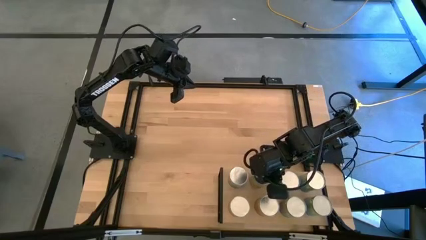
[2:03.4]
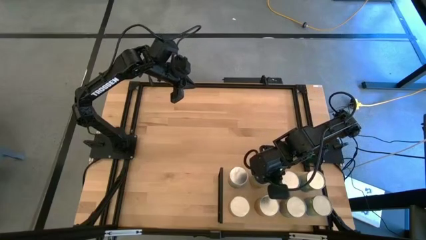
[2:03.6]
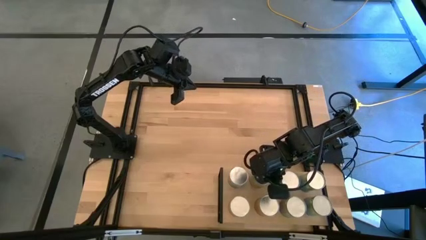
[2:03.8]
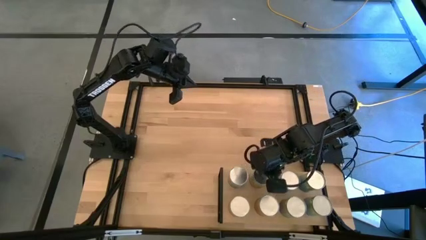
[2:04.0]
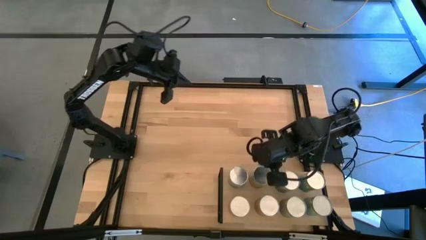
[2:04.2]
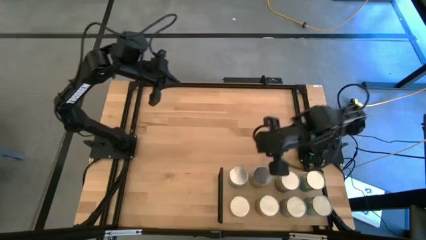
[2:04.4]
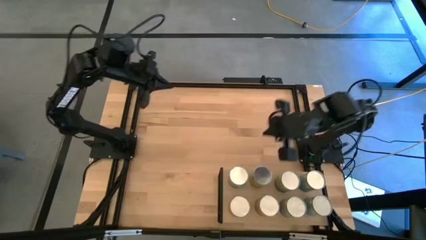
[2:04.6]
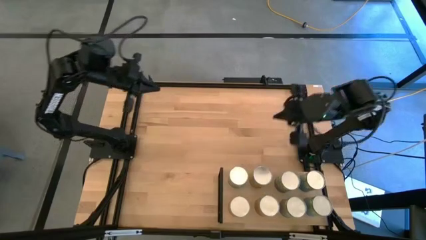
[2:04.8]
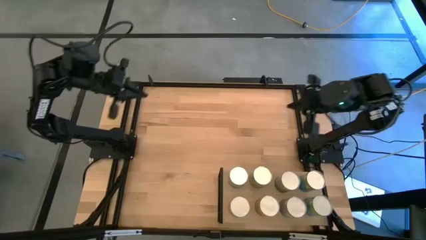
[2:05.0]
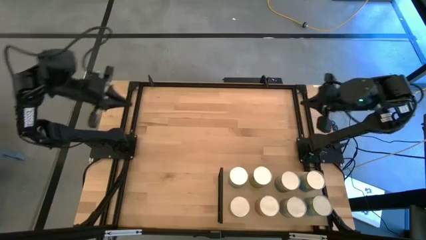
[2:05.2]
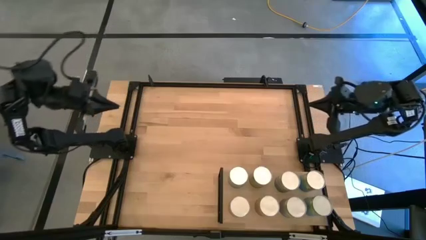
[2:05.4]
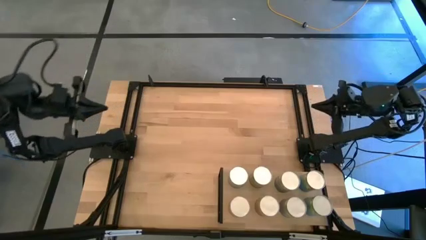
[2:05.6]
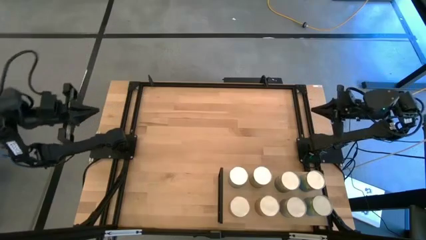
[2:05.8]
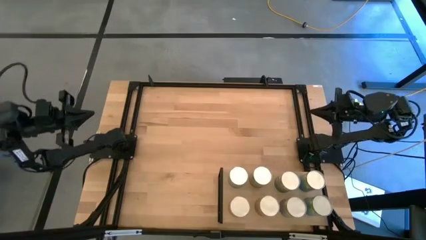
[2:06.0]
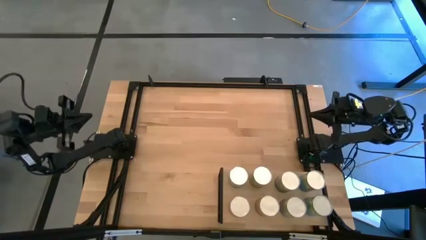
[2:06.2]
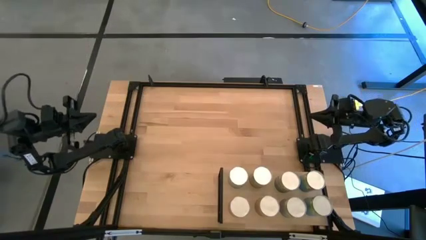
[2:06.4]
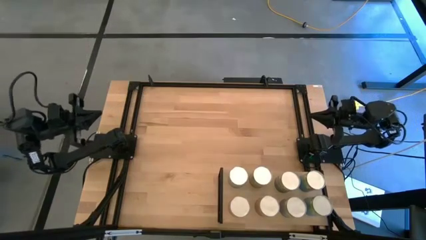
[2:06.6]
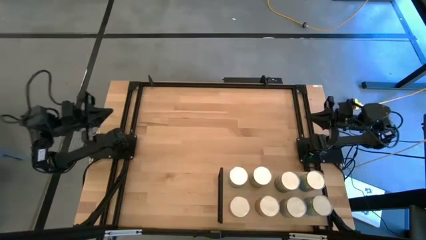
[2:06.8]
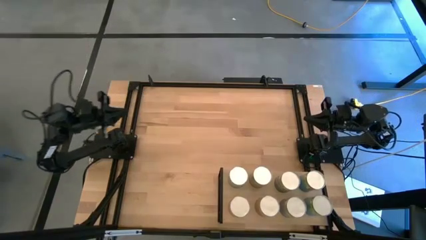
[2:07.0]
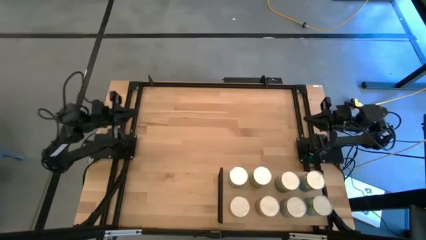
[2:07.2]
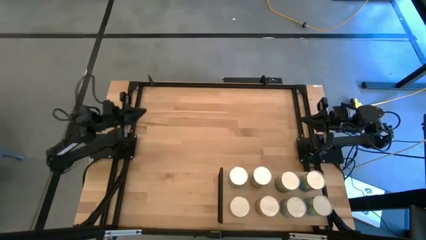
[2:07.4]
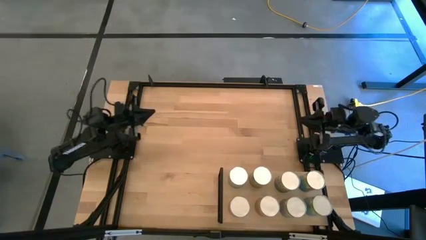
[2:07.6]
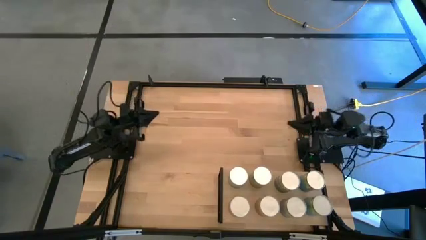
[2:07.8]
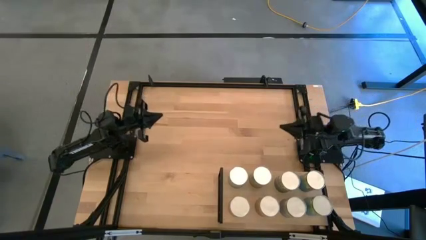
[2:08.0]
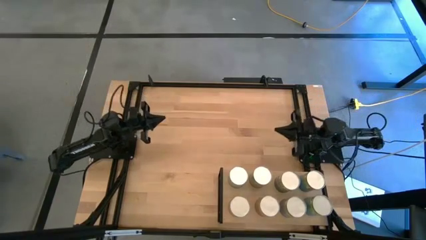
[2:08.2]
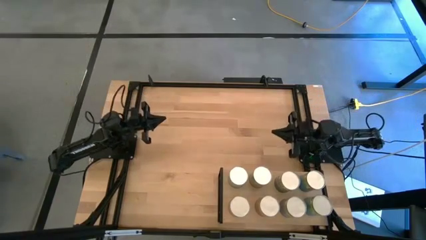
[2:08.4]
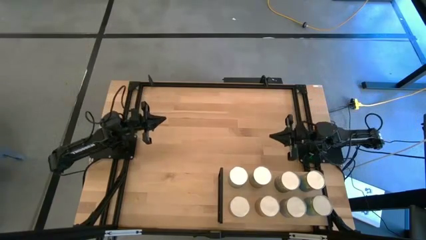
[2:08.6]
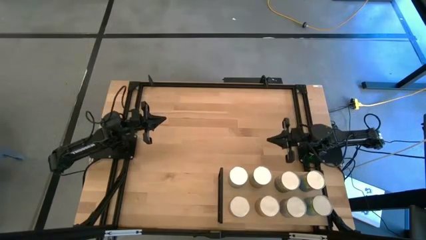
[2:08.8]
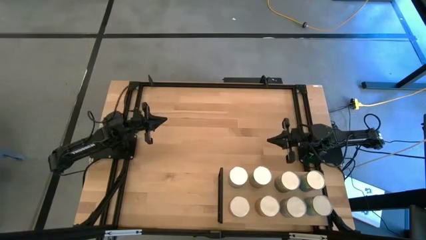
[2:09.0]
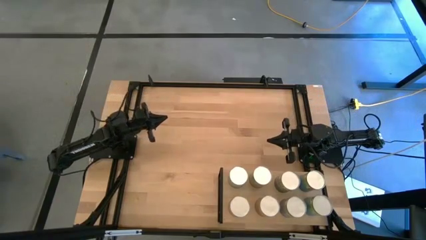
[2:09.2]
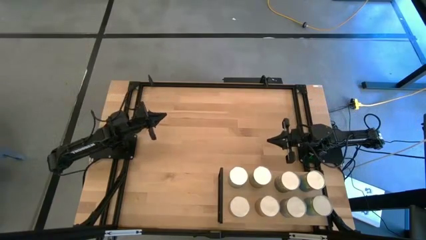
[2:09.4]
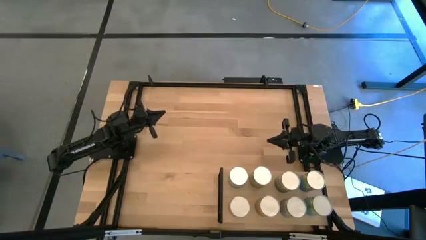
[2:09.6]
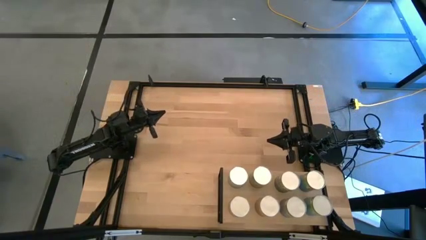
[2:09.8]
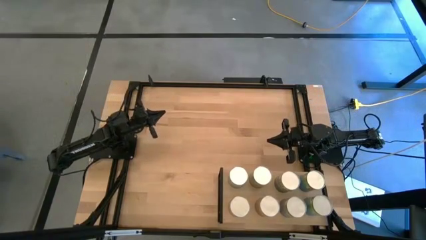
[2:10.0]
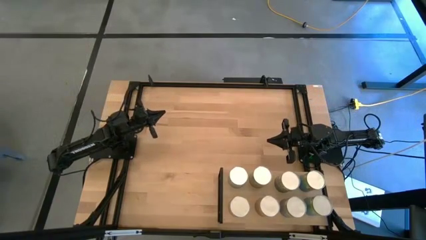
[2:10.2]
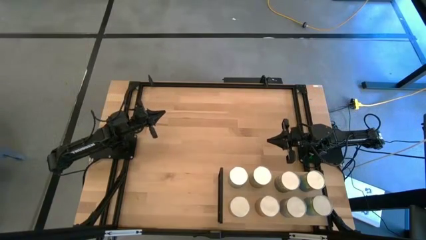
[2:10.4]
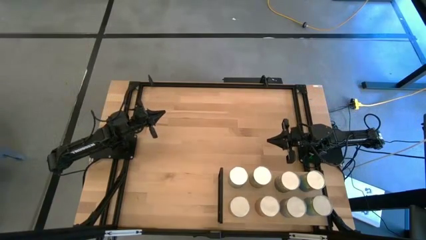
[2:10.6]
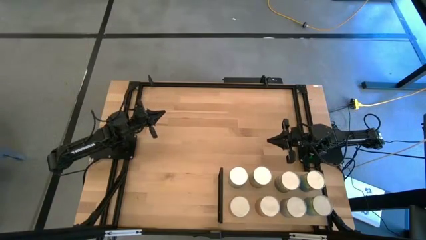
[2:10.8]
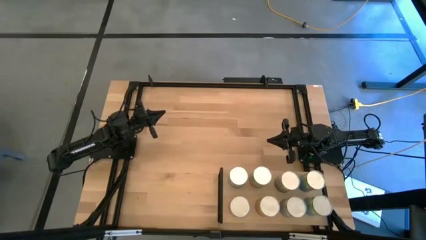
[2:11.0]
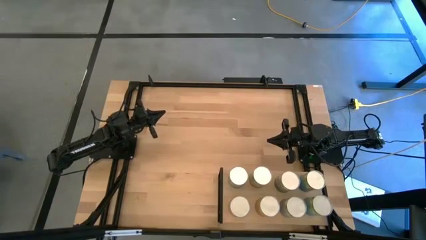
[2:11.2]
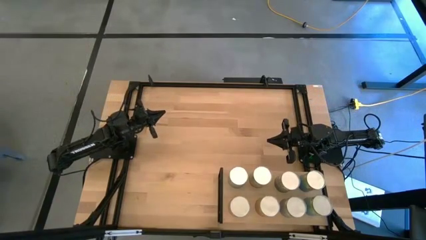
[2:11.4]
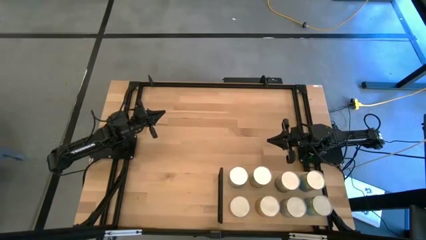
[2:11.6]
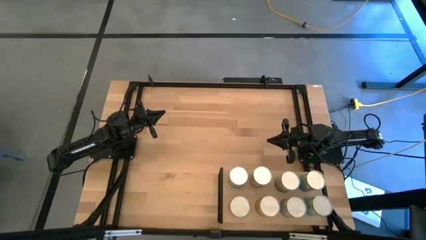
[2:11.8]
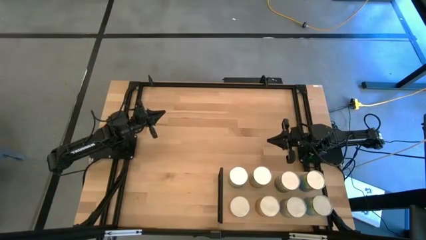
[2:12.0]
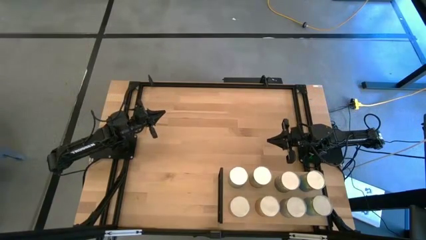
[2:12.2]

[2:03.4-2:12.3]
Task: Pick and place cans onto a shelf
Return to Home Position

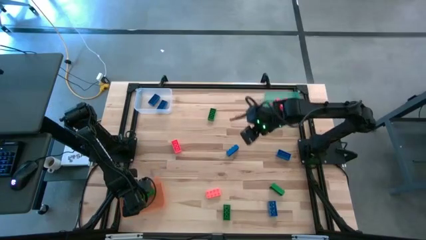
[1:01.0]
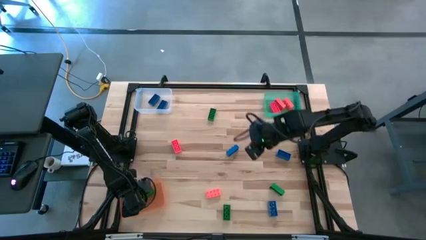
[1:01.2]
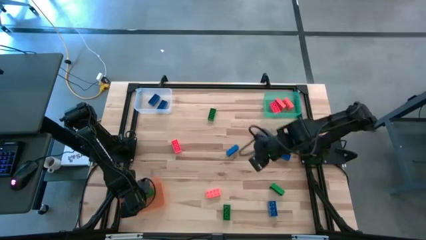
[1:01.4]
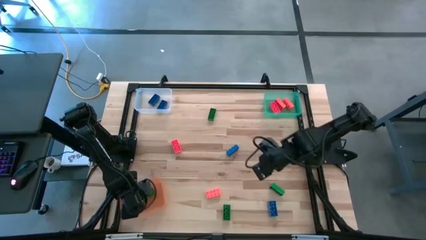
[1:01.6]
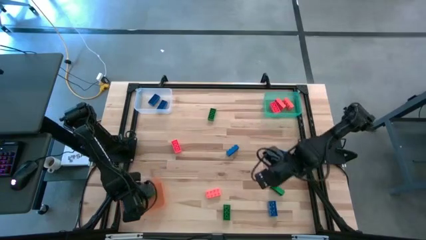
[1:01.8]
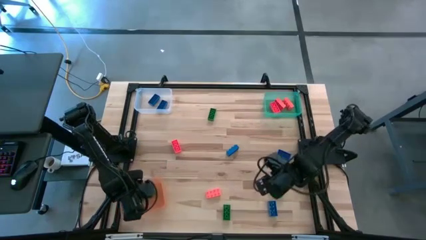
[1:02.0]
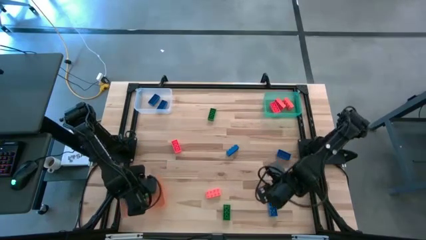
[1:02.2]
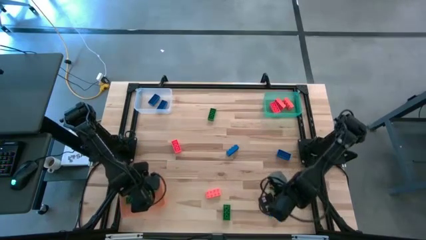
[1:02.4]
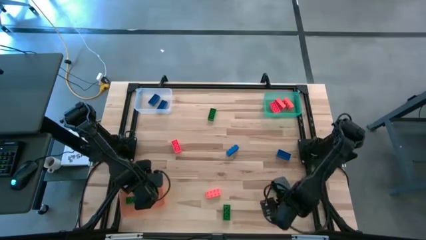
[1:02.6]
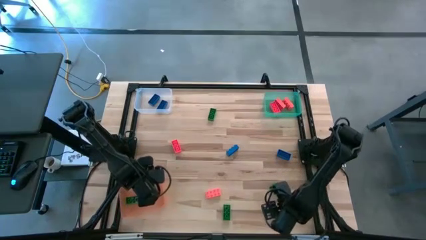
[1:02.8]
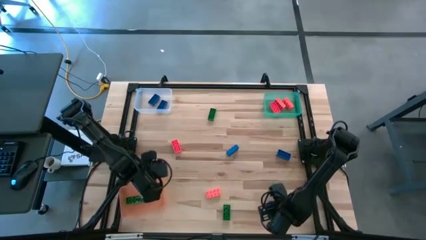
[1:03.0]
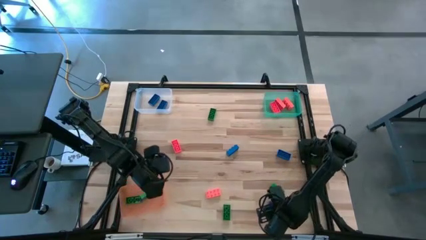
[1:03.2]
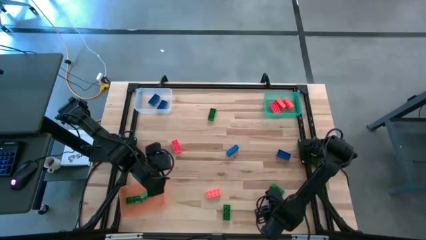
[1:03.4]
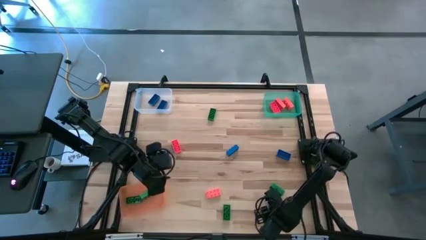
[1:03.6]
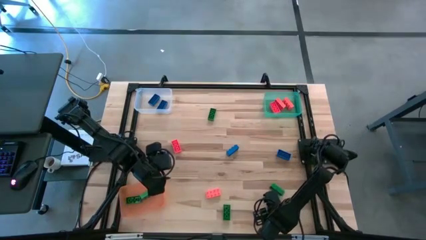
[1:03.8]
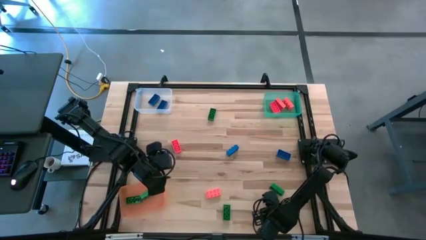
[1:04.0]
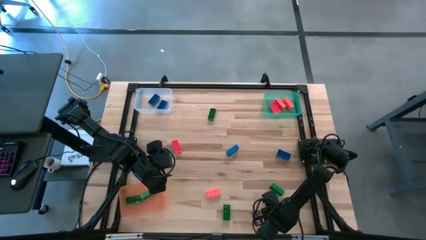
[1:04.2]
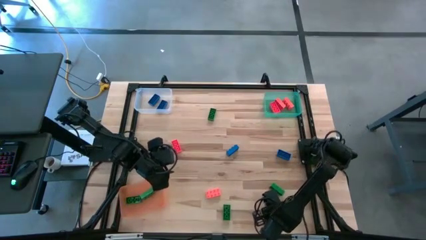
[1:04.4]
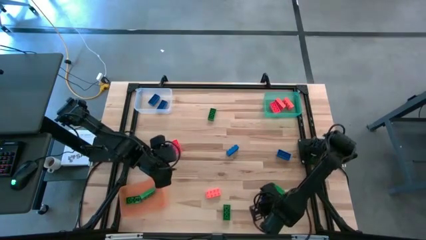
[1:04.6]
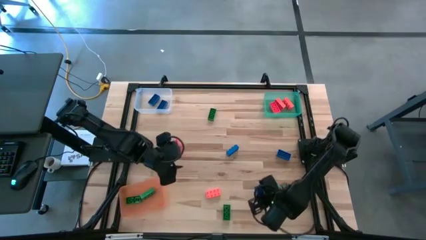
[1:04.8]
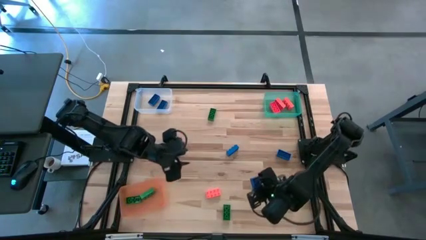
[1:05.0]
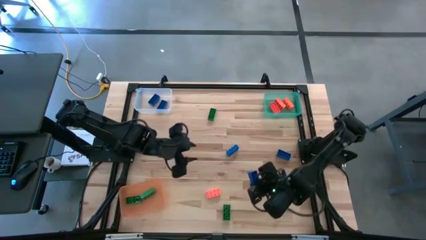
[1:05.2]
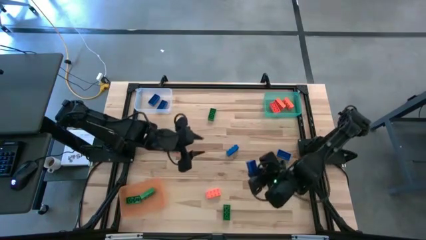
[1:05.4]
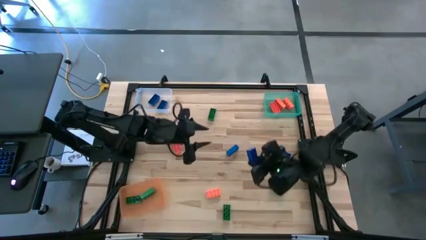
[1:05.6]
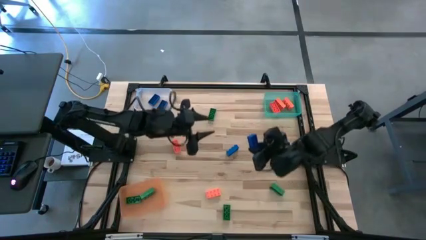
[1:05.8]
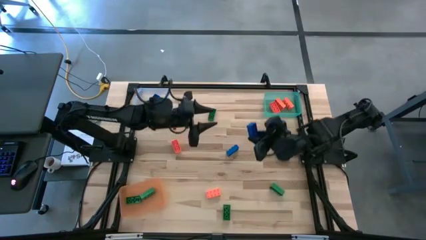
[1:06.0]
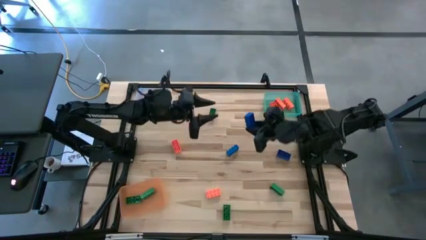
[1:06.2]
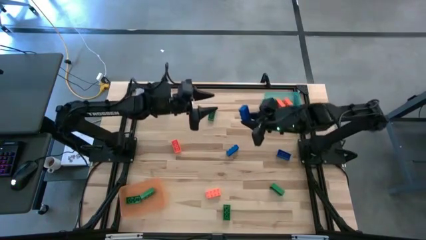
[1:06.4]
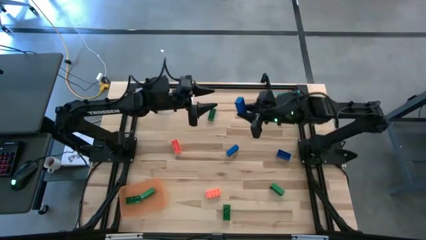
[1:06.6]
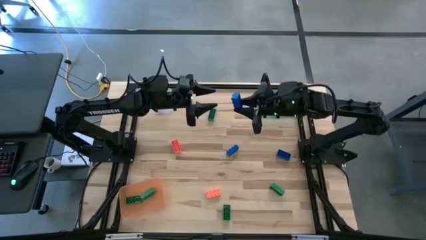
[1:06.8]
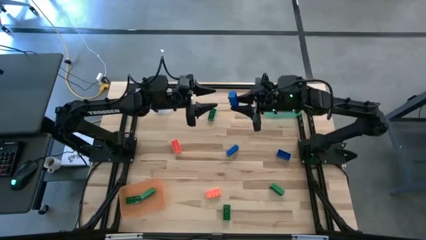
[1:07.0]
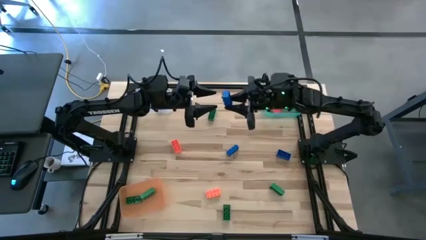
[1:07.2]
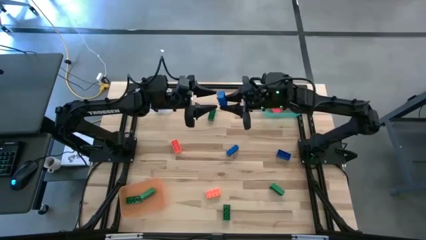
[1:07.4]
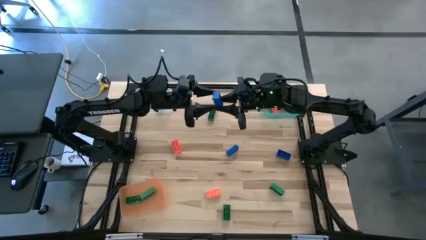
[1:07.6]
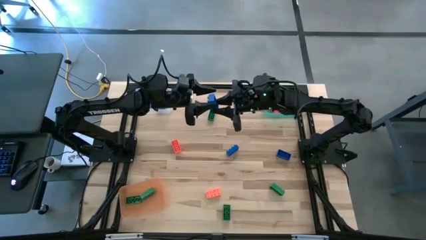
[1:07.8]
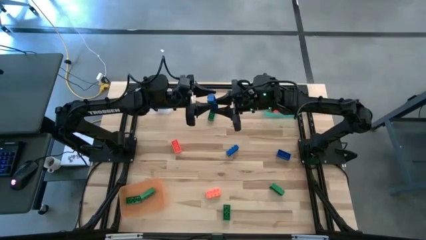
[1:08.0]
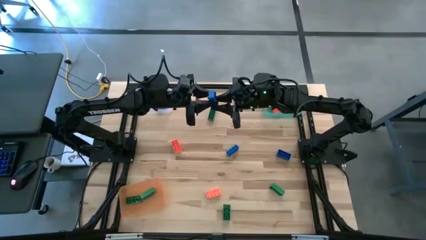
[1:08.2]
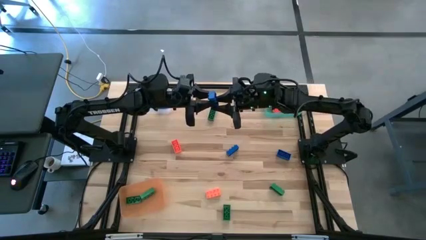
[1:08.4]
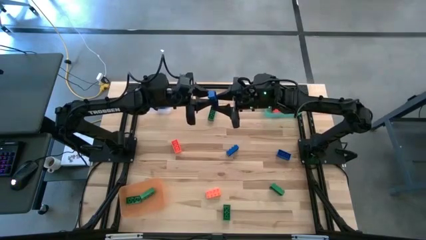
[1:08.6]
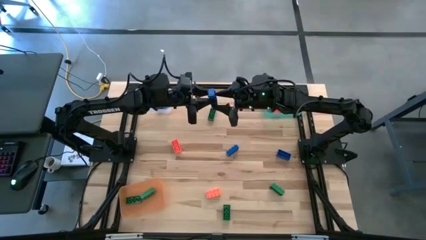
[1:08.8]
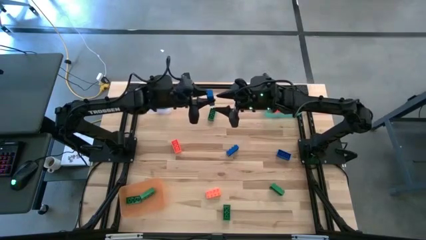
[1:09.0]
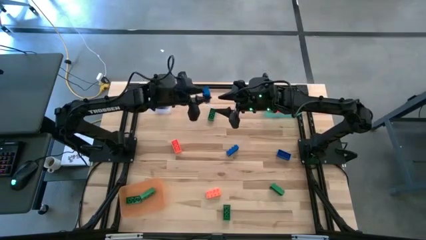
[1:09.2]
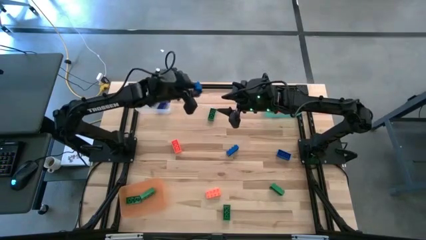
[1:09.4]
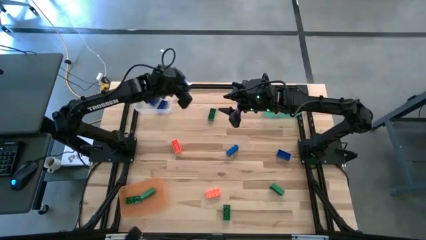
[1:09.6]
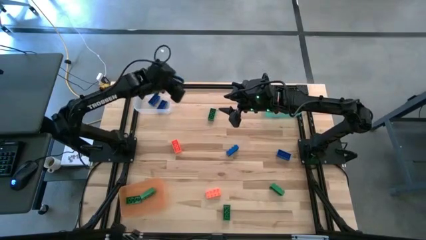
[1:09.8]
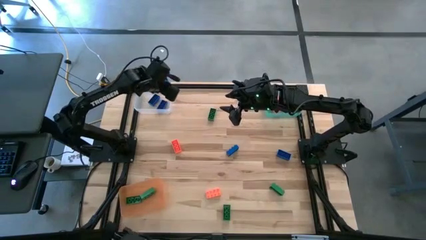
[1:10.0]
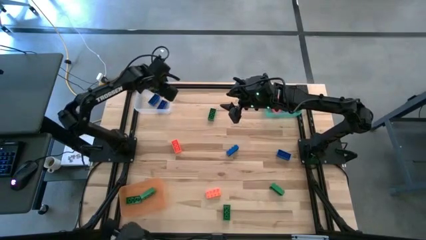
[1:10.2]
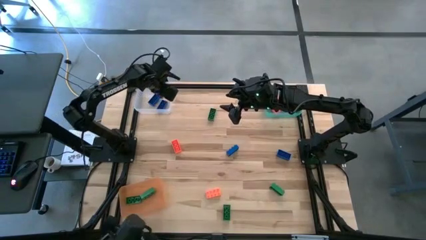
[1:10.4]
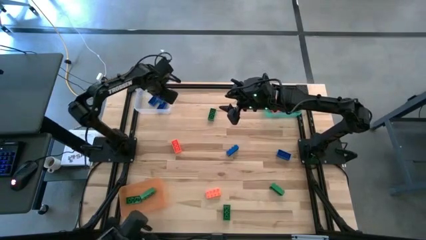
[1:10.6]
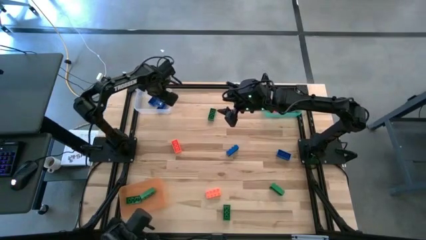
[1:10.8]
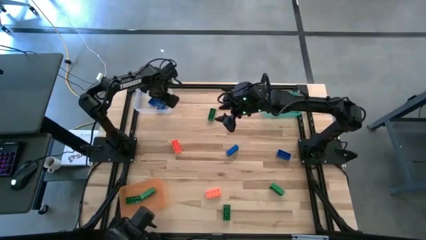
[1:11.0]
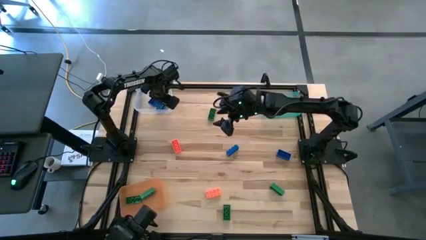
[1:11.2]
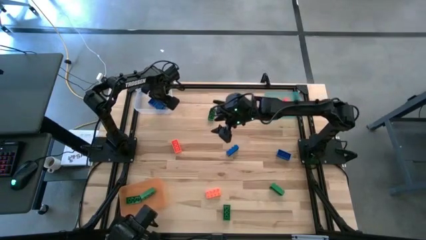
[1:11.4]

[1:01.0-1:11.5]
Task: Sort & place blocks by color
Put the blue game piece into the transparent bin
